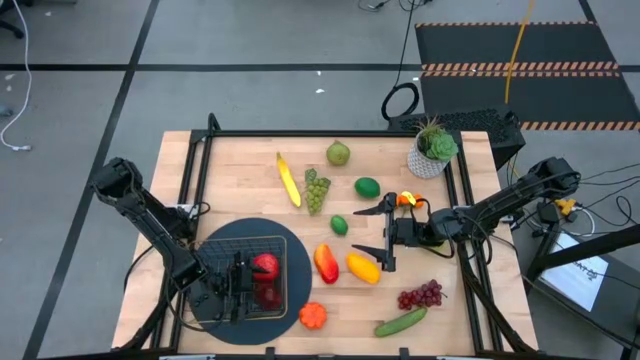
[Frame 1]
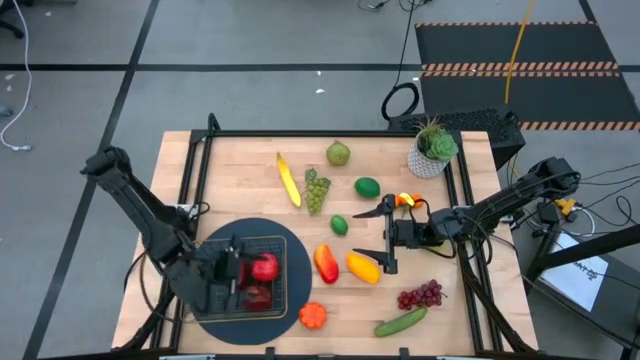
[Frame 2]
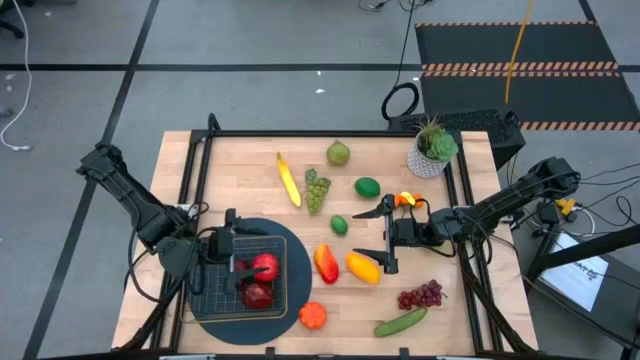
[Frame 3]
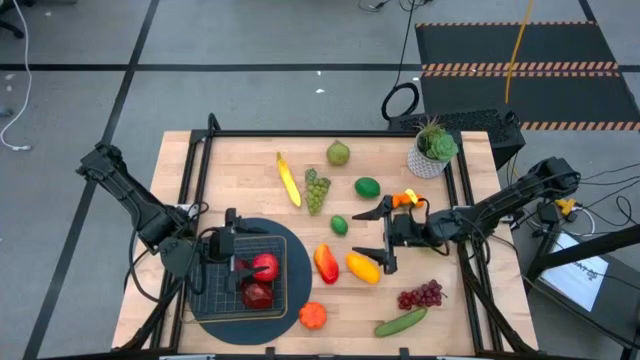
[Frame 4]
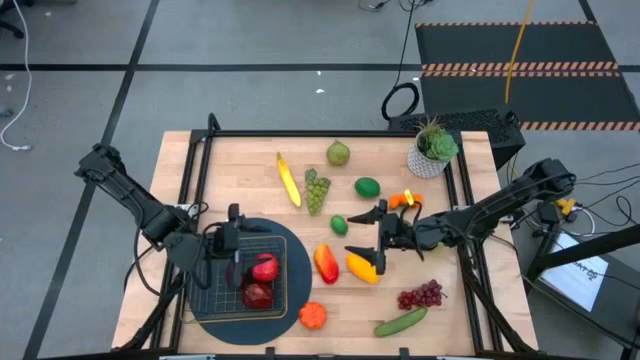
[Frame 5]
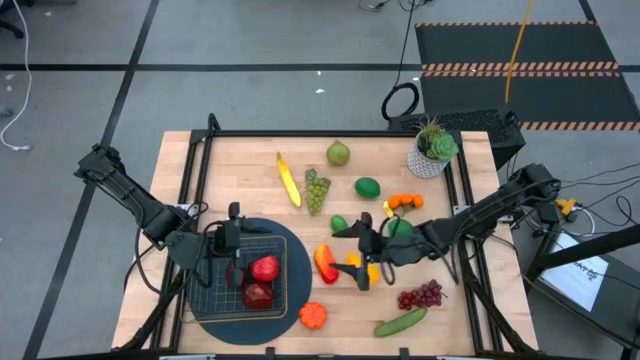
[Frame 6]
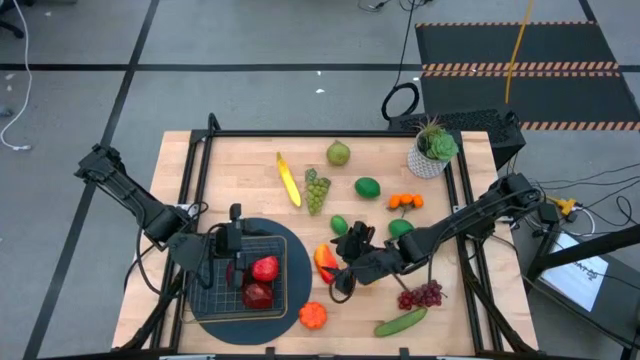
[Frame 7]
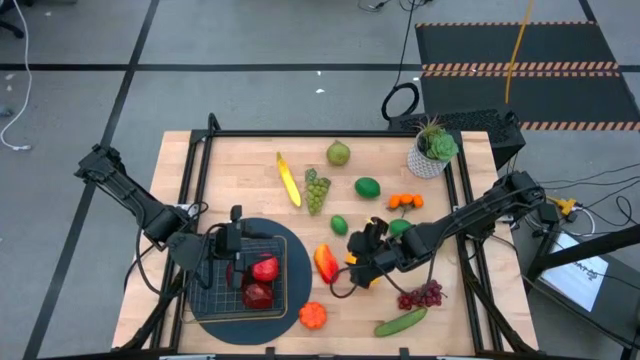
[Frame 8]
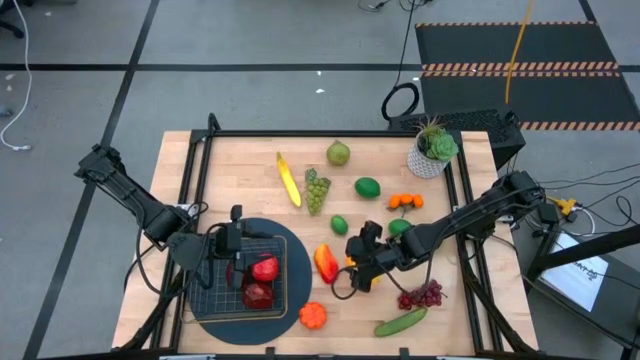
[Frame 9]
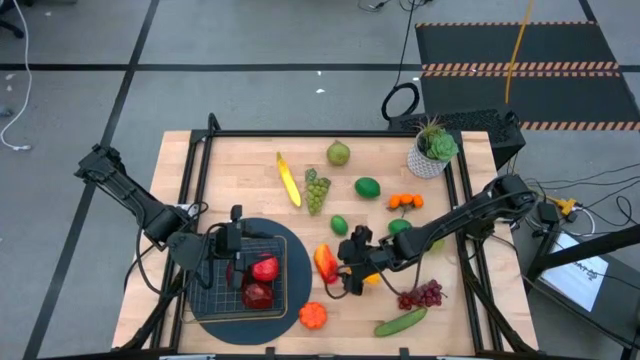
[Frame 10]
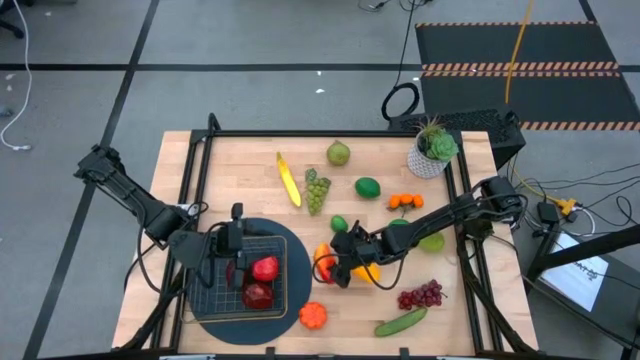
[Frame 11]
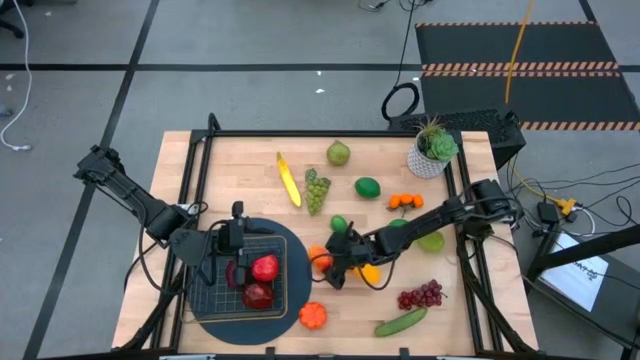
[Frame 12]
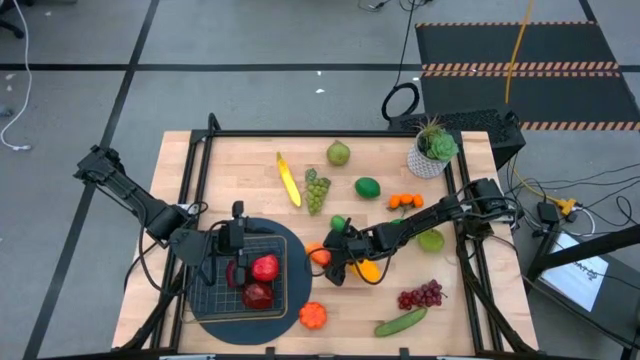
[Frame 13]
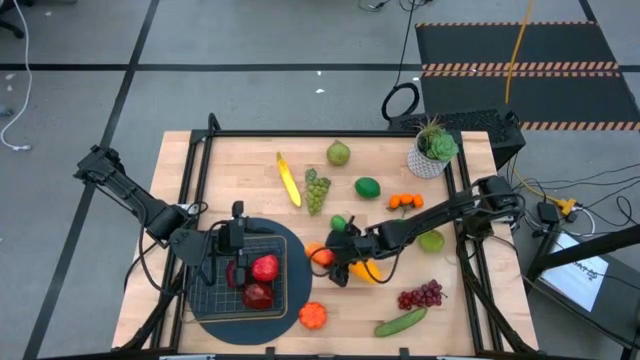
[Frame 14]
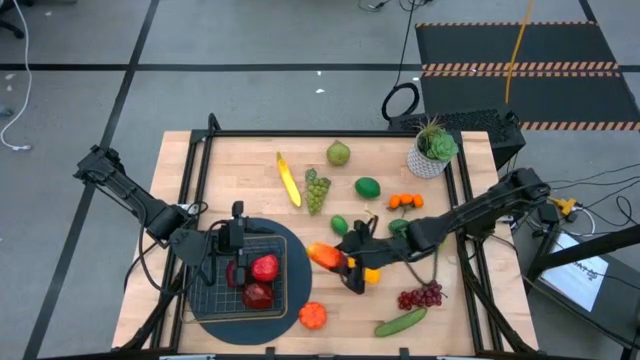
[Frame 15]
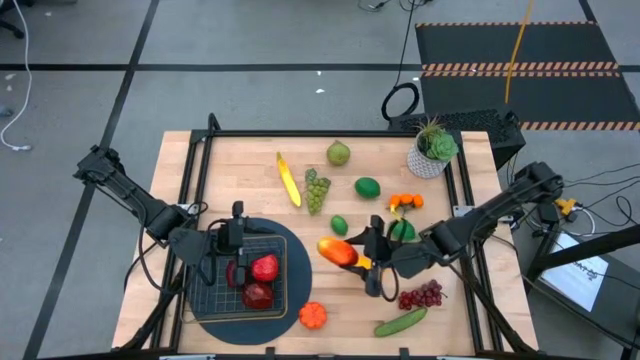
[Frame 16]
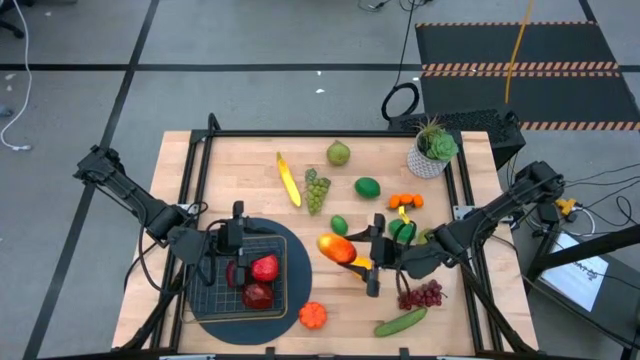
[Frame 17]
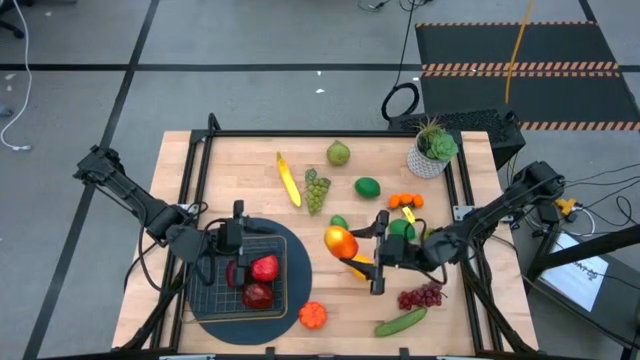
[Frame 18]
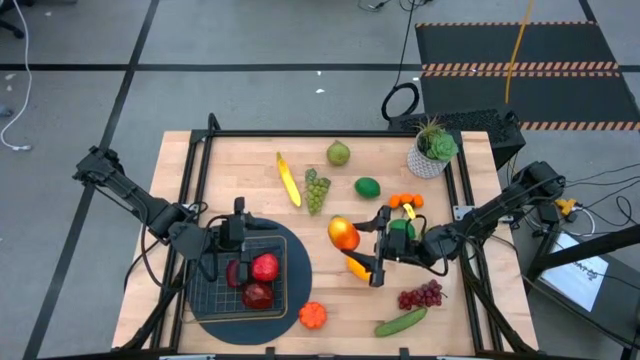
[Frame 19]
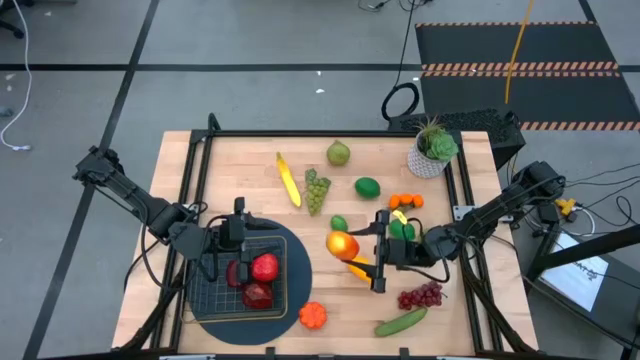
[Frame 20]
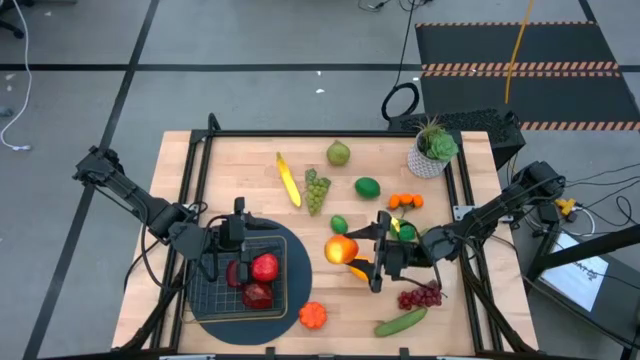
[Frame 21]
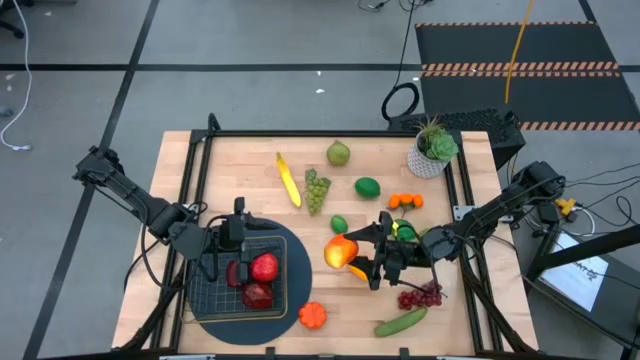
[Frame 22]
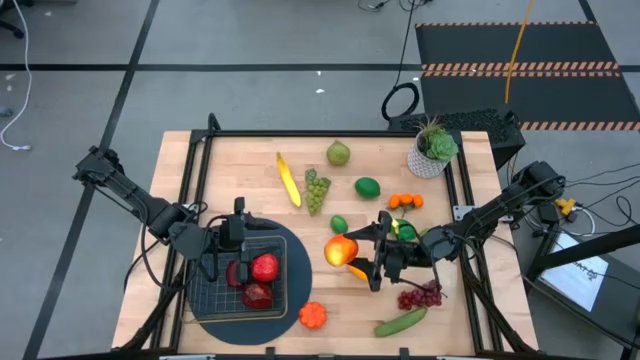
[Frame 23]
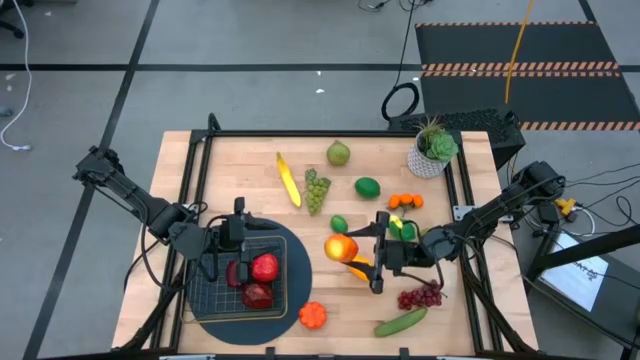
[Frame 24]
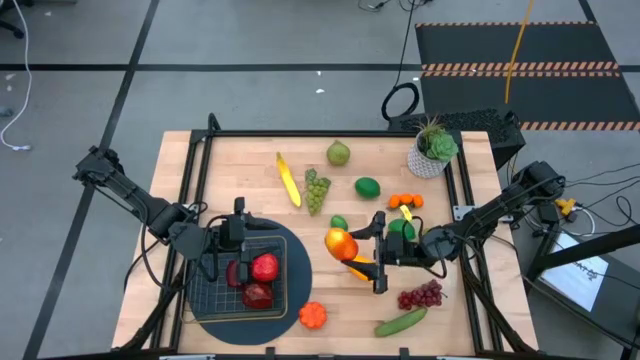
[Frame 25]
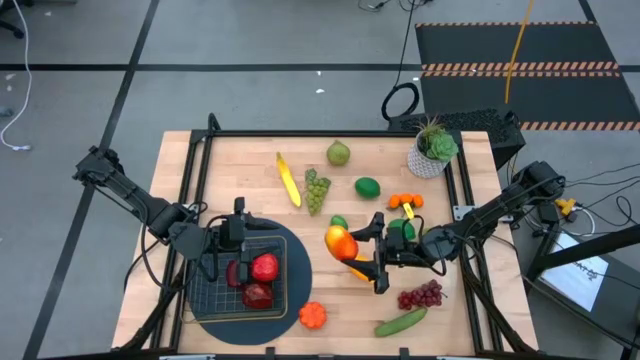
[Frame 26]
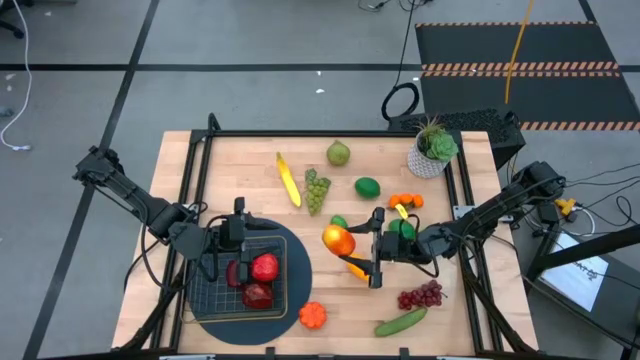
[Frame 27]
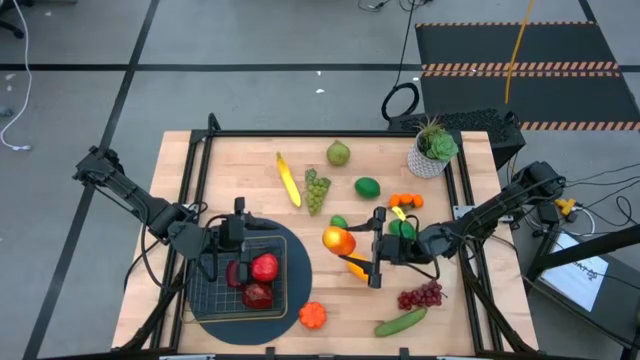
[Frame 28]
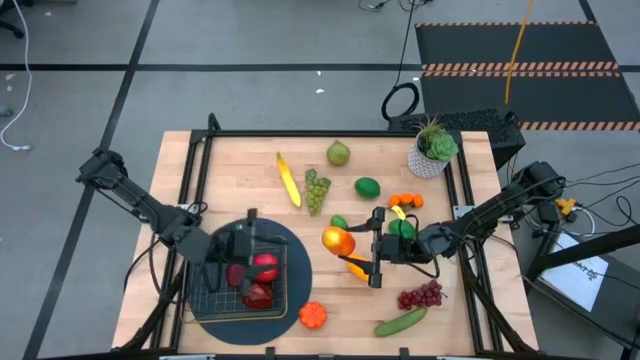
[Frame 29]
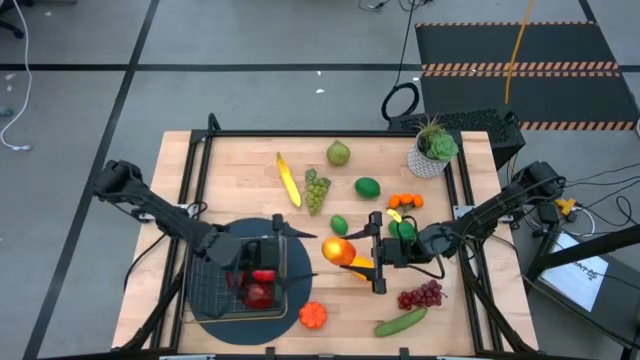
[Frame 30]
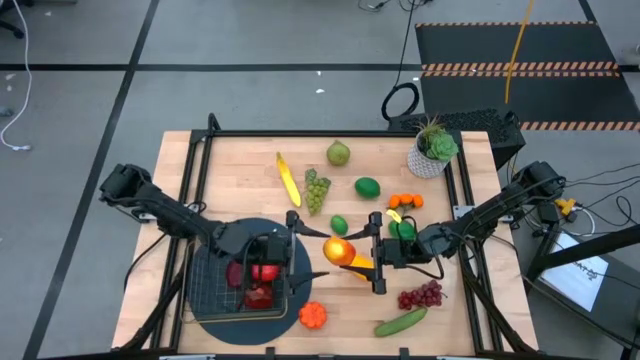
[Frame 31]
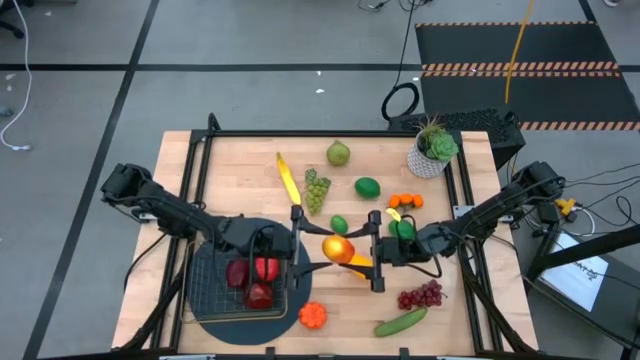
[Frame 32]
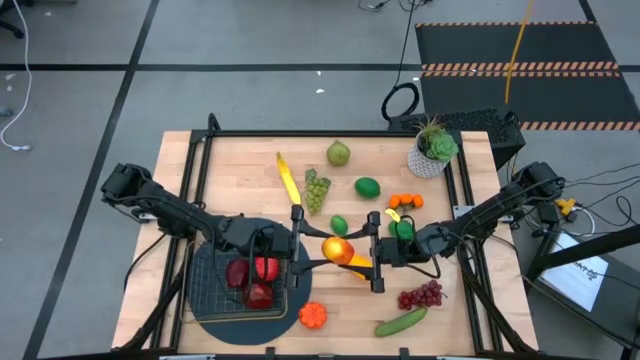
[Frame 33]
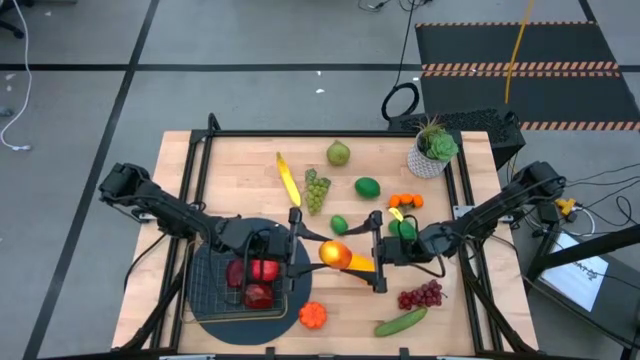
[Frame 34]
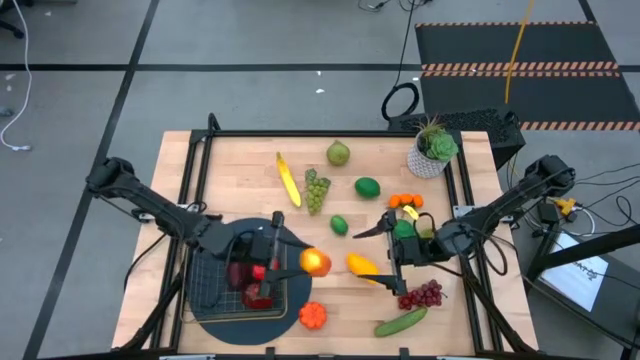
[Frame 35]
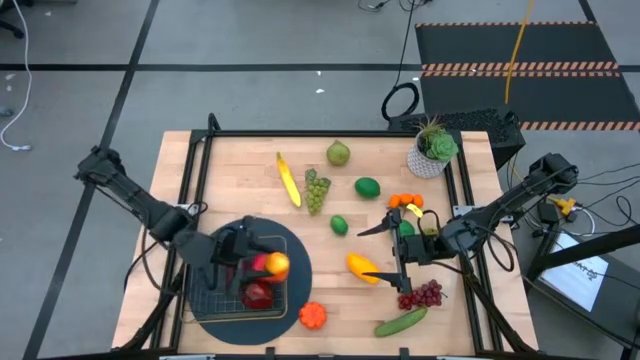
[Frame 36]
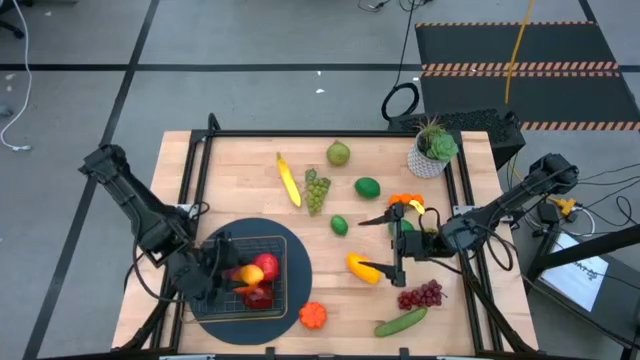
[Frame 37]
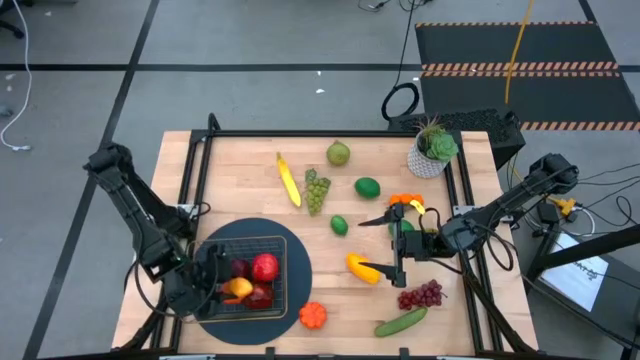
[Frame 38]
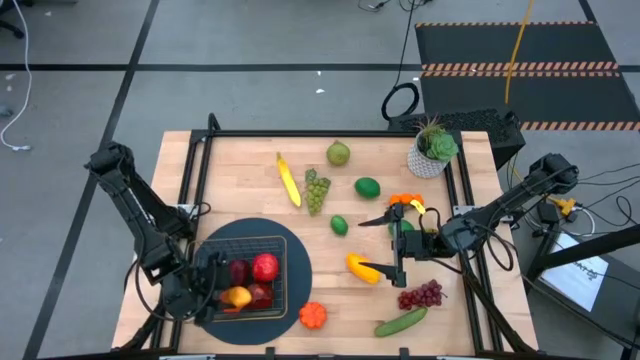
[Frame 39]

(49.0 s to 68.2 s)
Task: Build produce basket
Put the orange mango into the gold wire basket
